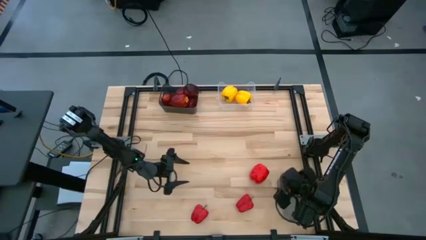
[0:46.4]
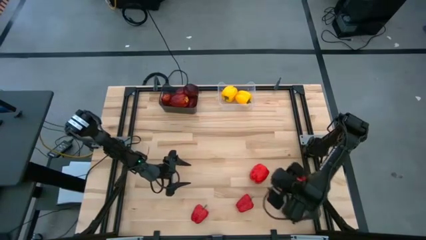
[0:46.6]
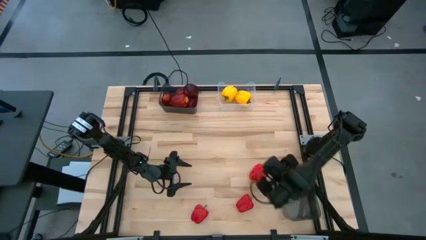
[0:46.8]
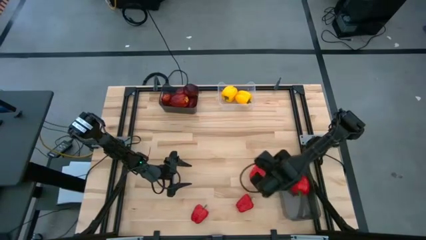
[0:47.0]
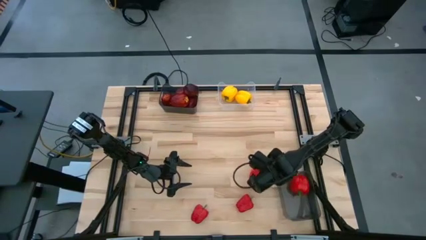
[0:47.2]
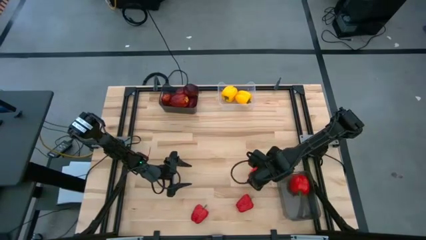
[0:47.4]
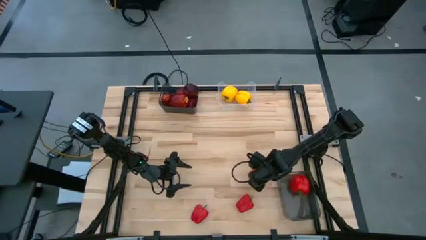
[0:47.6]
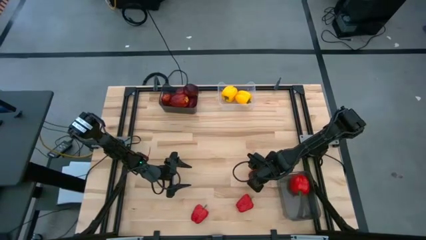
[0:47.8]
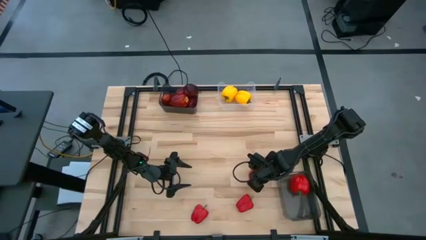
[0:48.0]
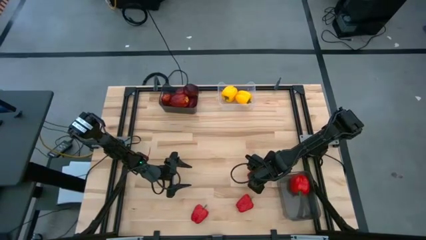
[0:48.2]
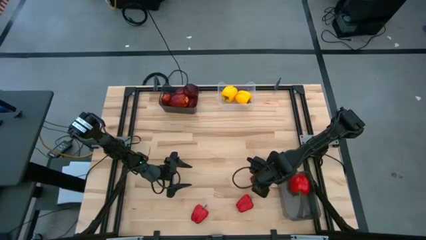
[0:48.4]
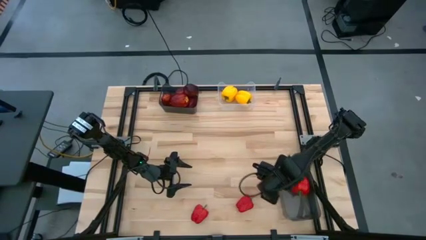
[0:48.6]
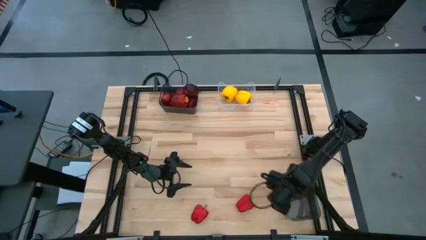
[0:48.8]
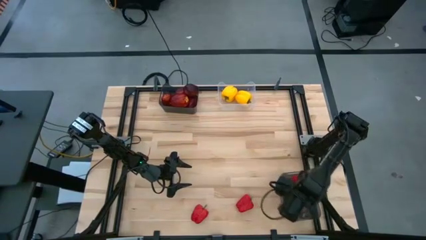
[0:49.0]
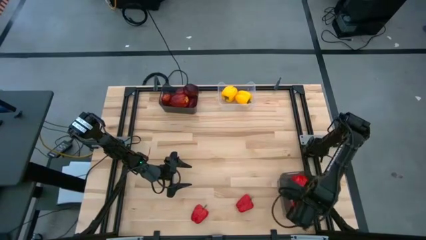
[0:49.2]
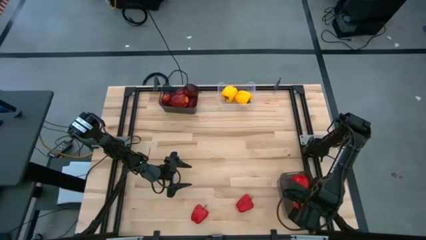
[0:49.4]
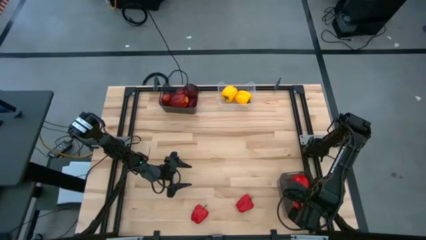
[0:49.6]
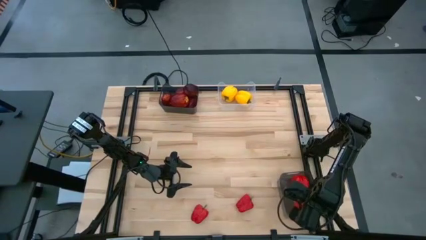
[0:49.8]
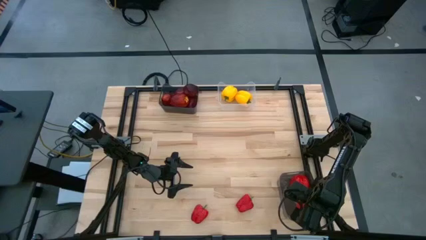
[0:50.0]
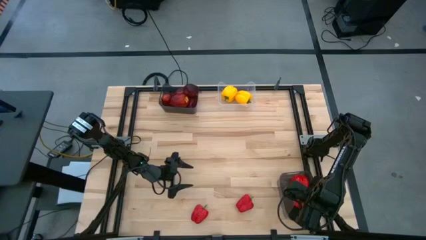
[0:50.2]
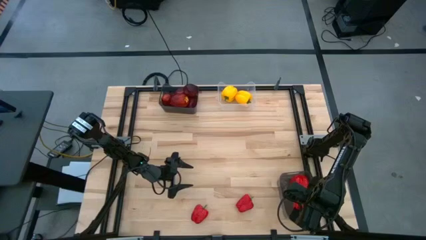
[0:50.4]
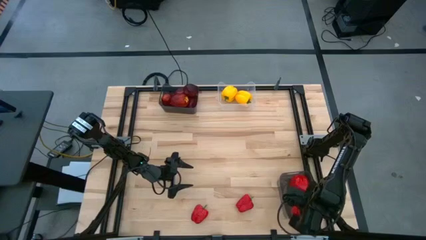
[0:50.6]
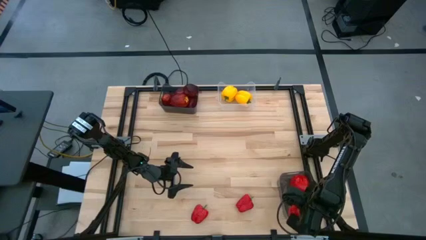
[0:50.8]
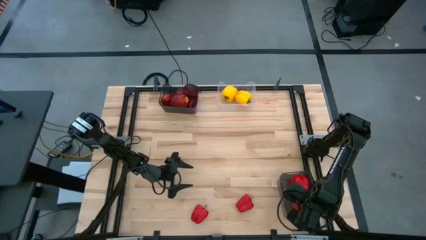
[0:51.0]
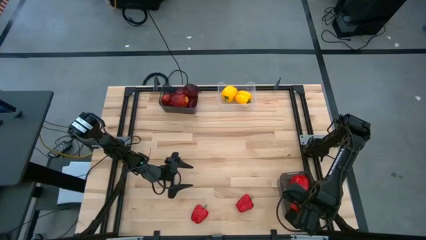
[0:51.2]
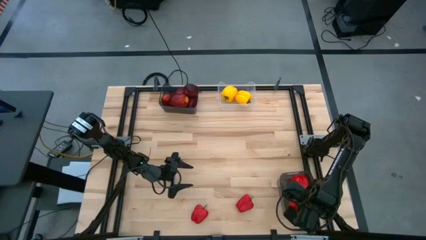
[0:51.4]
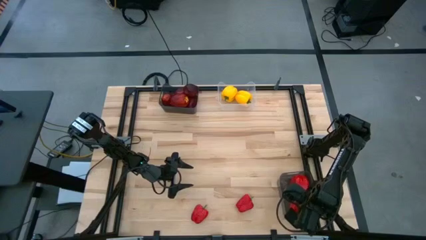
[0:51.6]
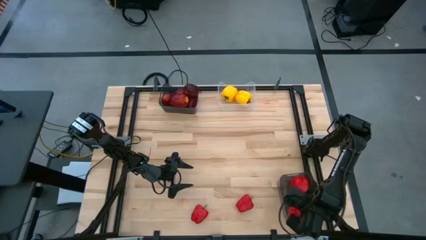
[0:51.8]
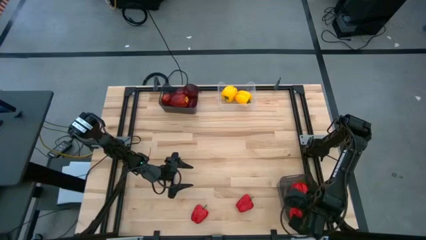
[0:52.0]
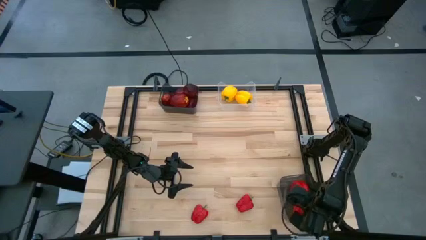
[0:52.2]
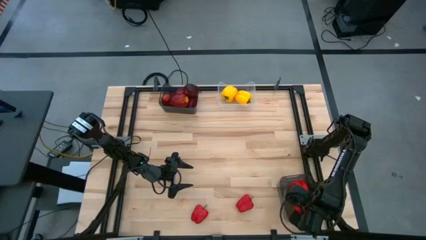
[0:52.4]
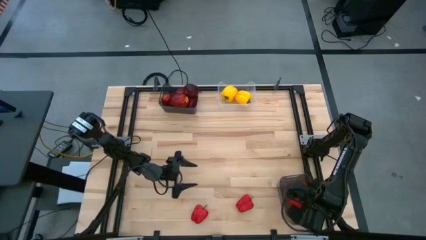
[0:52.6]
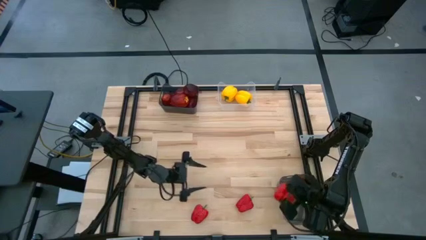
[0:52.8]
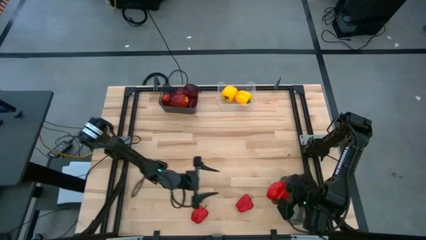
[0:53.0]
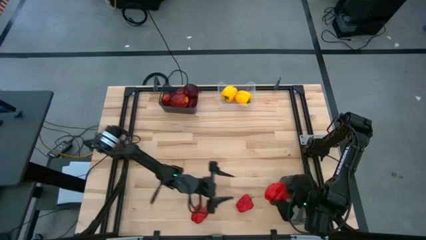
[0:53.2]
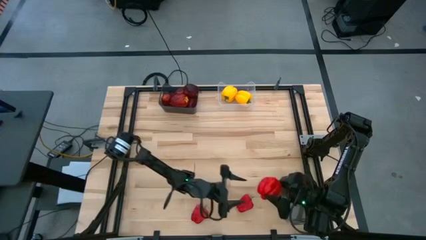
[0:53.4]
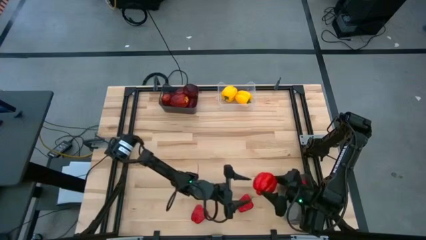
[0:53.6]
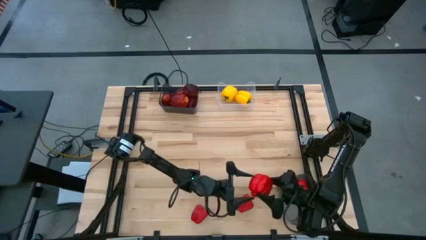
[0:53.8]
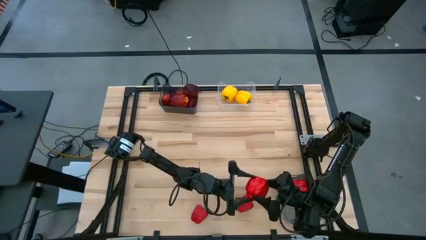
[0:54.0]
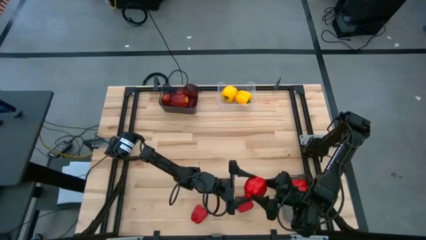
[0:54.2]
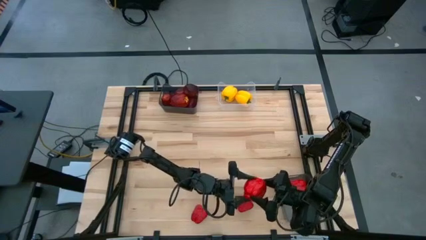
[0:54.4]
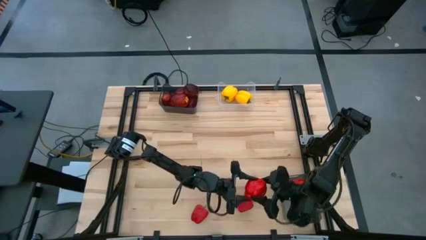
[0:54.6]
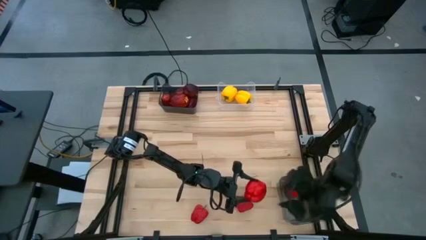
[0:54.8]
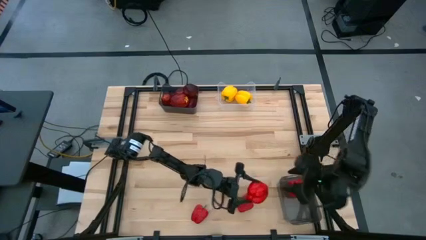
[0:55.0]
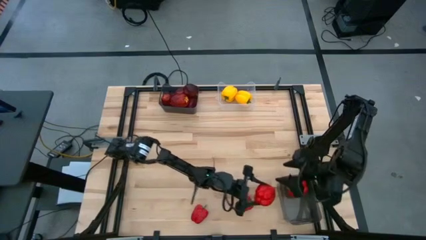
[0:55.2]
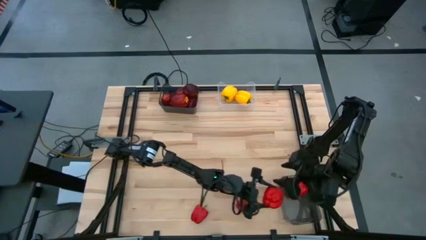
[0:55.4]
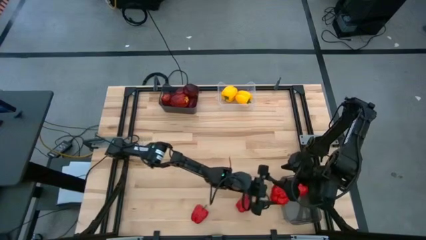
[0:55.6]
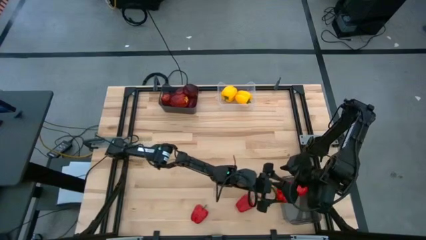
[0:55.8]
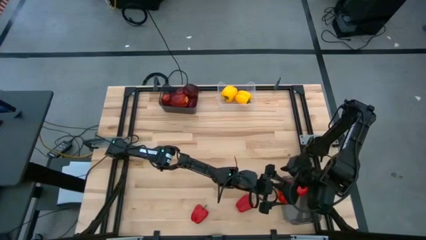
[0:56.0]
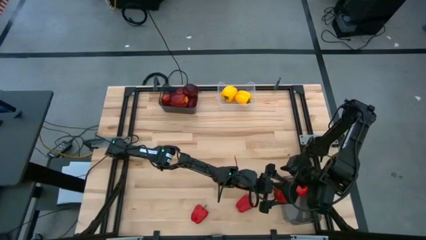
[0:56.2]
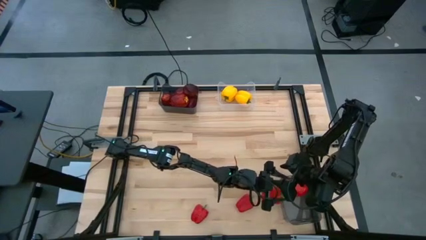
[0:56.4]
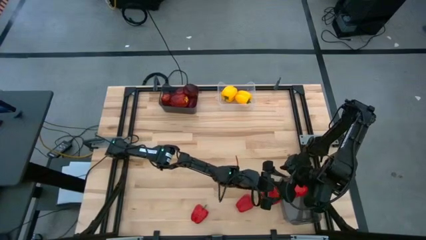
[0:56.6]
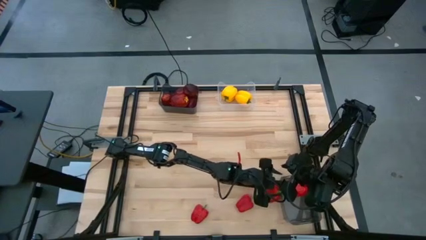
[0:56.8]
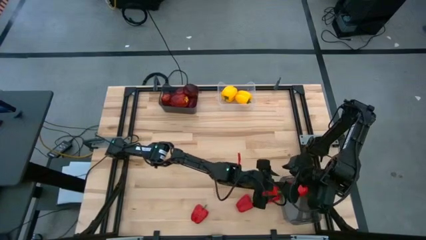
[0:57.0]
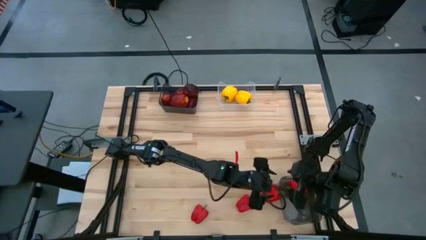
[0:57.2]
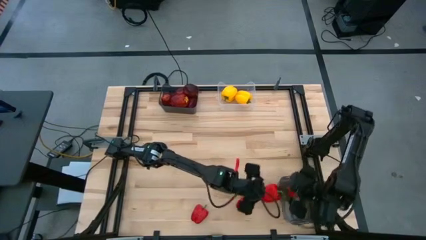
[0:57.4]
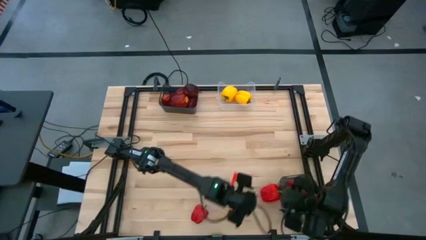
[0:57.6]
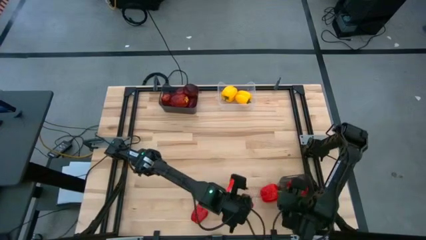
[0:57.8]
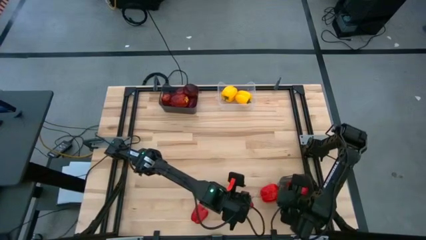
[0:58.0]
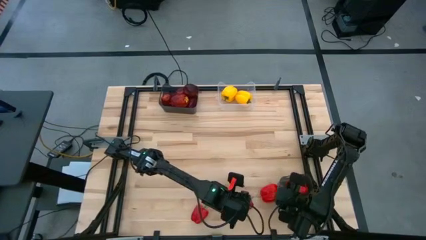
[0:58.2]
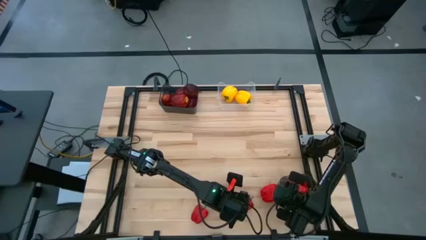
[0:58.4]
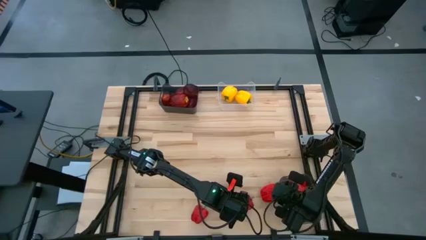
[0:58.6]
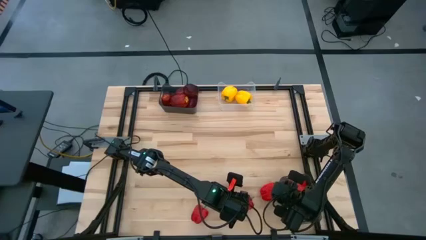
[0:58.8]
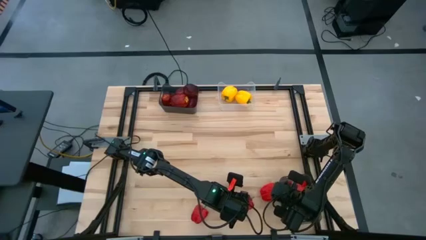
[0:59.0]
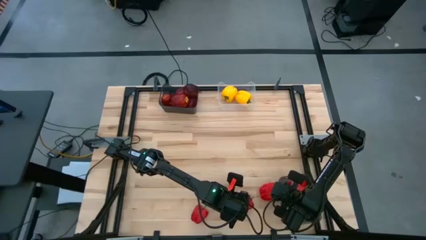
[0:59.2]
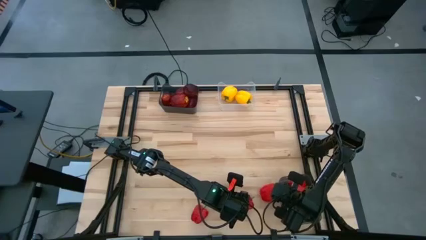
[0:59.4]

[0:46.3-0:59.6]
Task: Sort produce into baskets
Put the red bell pepper into the bottom black bin

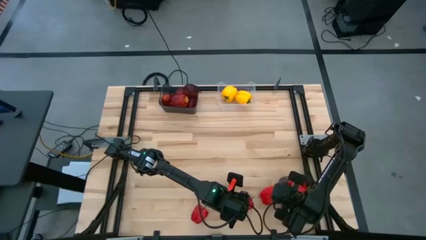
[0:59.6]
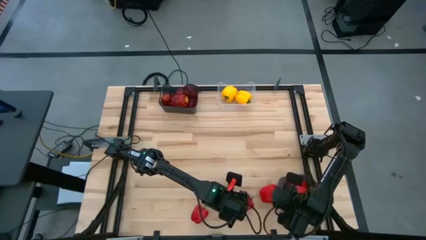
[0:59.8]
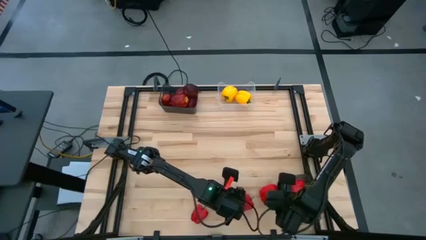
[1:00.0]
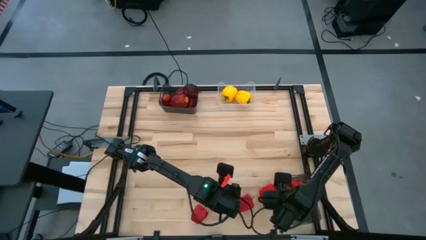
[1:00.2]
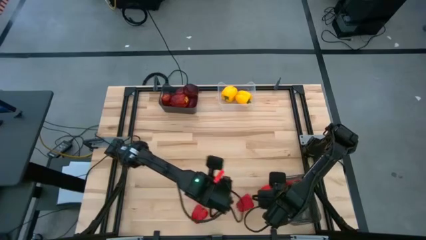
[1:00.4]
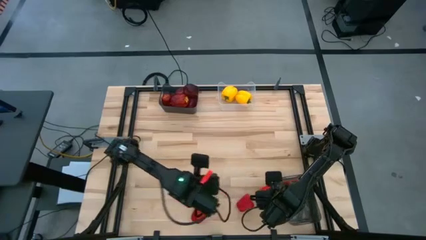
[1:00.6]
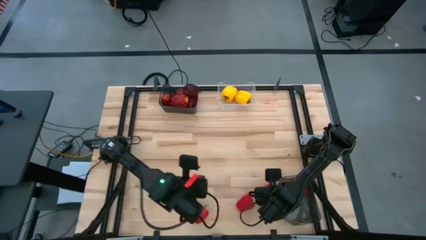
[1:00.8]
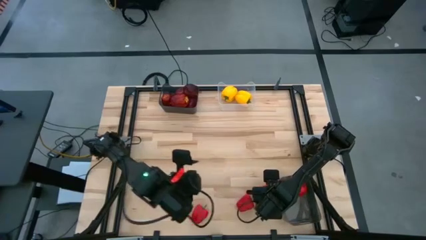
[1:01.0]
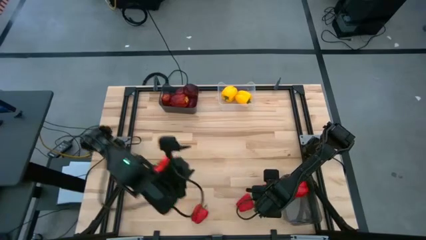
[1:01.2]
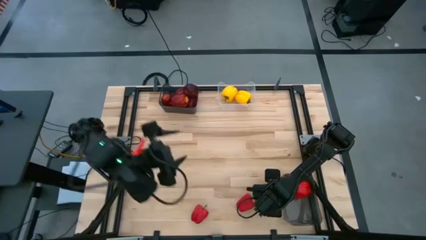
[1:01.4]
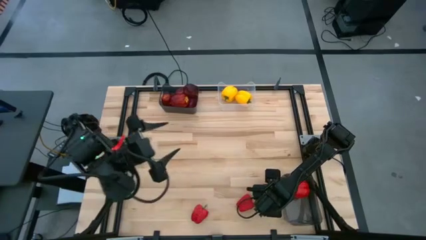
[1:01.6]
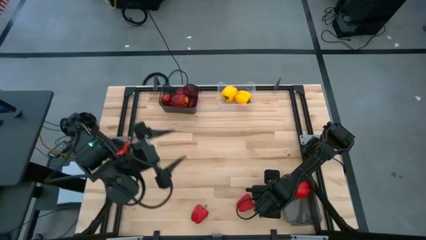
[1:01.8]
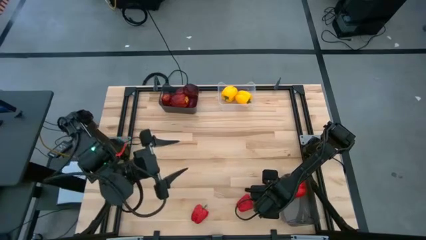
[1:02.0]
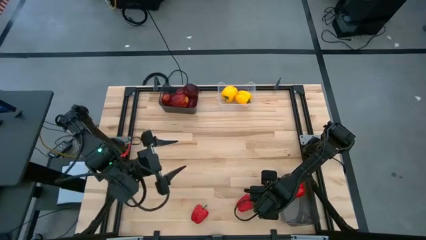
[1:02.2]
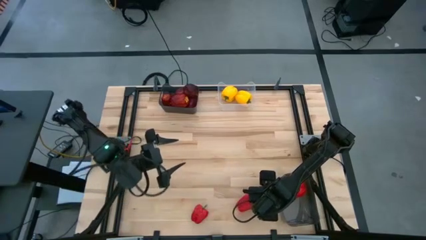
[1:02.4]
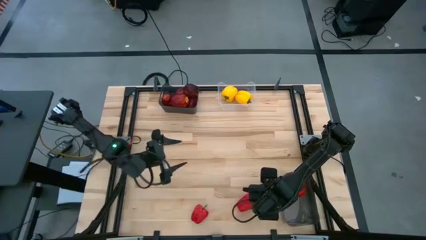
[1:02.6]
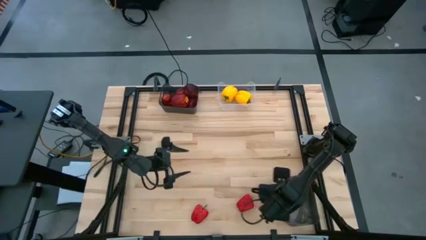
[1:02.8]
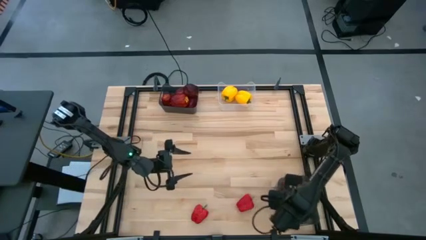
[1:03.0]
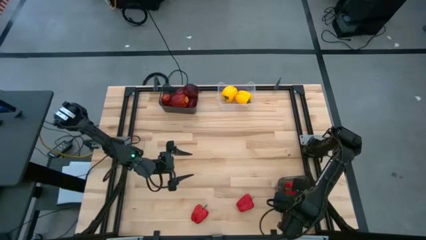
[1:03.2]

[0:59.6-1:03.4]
Put the red bell pepper into the bottom black bin
